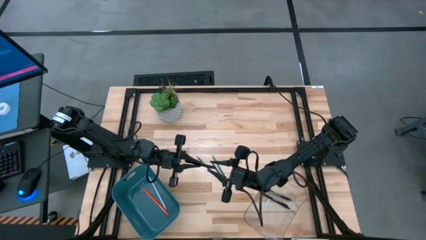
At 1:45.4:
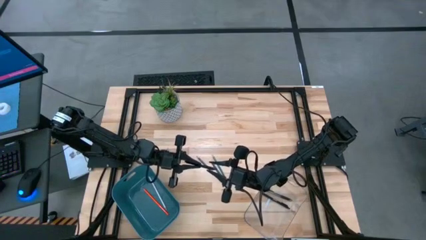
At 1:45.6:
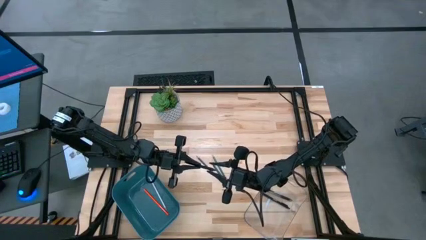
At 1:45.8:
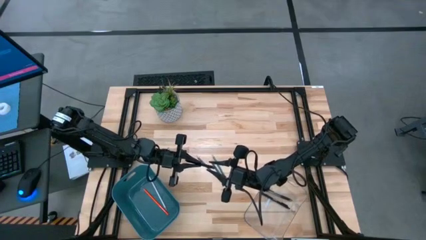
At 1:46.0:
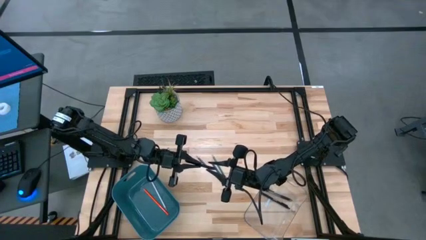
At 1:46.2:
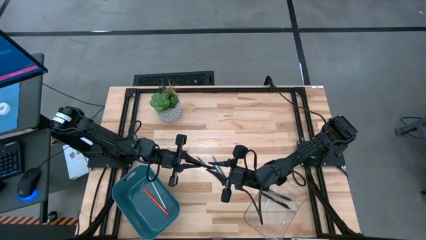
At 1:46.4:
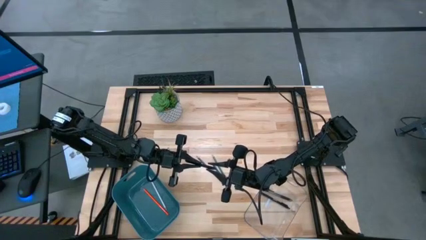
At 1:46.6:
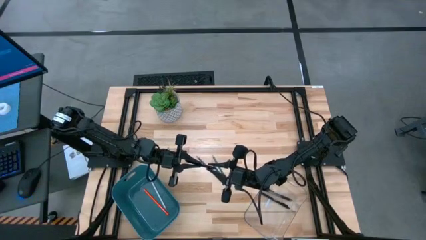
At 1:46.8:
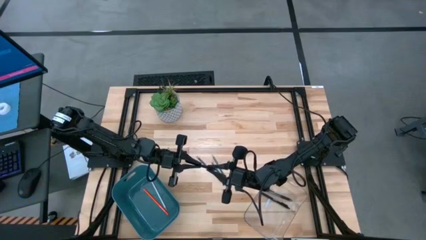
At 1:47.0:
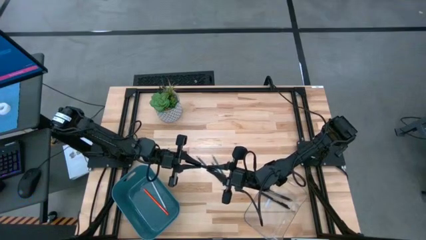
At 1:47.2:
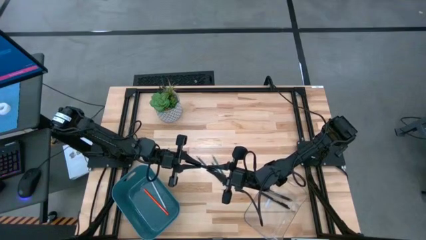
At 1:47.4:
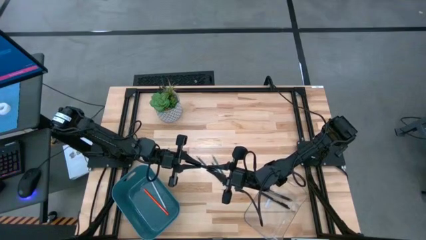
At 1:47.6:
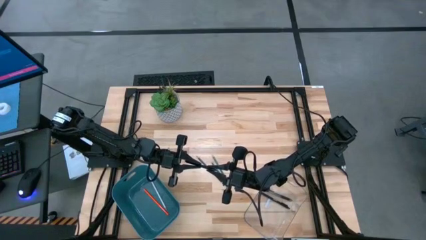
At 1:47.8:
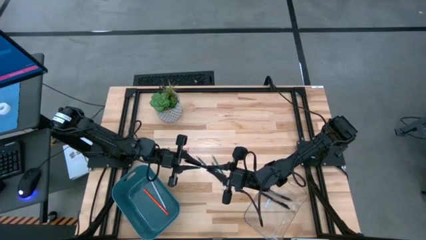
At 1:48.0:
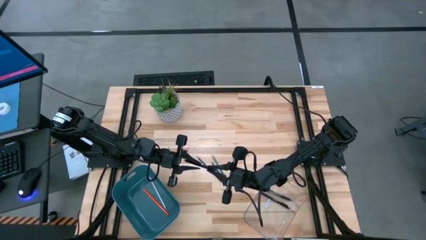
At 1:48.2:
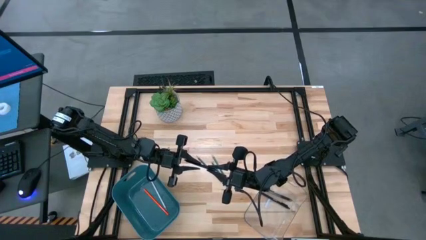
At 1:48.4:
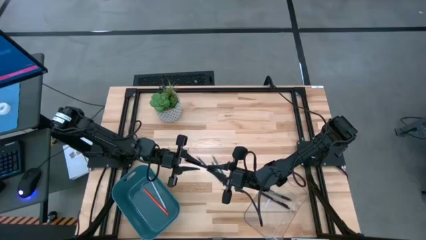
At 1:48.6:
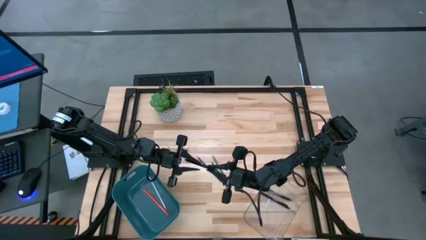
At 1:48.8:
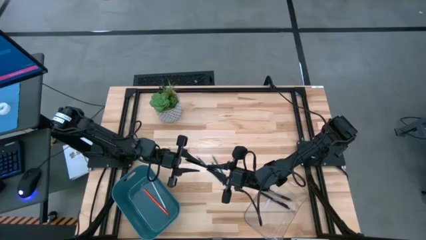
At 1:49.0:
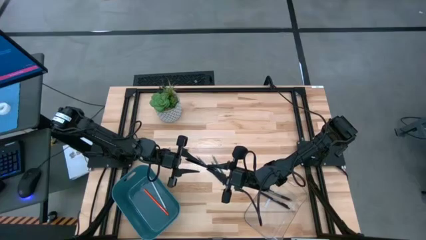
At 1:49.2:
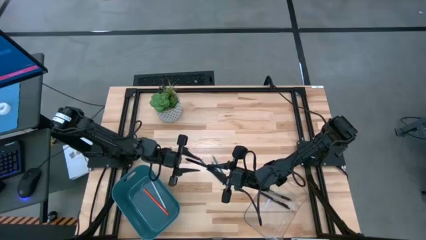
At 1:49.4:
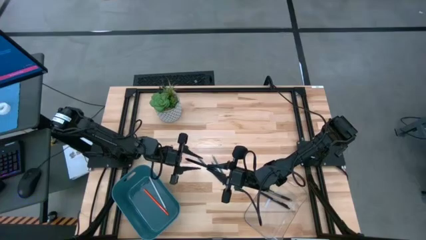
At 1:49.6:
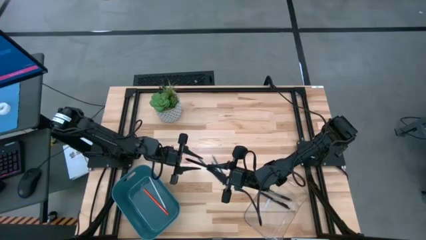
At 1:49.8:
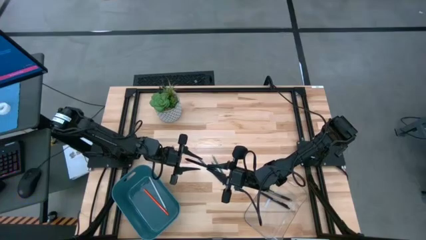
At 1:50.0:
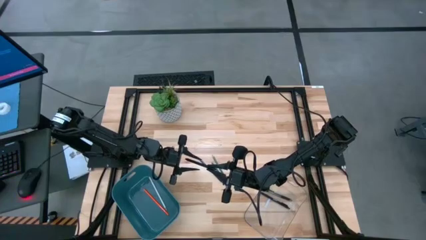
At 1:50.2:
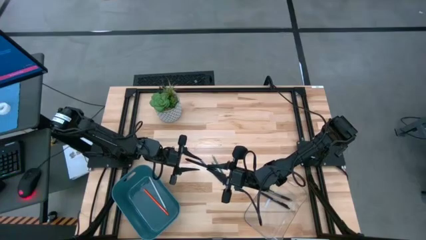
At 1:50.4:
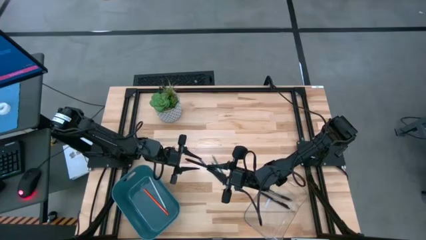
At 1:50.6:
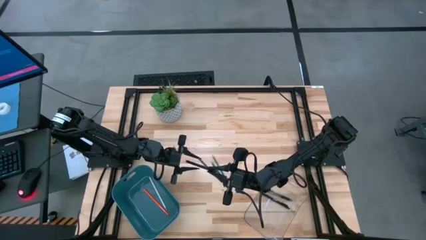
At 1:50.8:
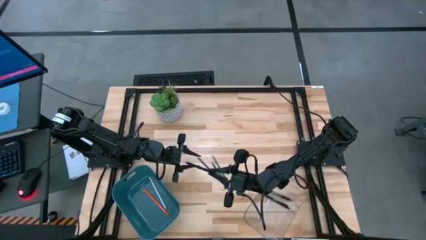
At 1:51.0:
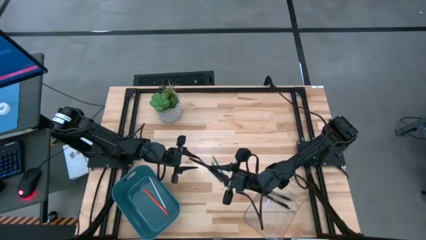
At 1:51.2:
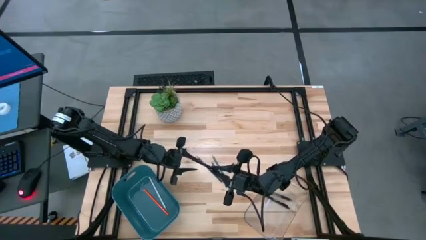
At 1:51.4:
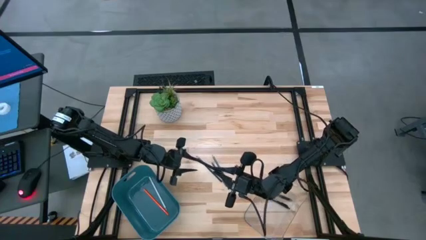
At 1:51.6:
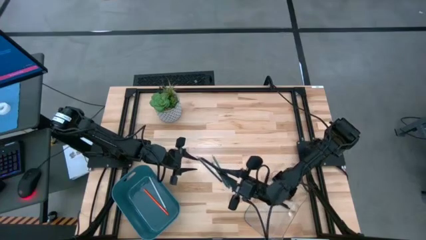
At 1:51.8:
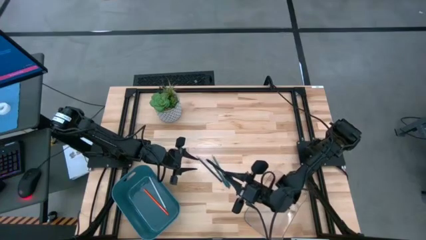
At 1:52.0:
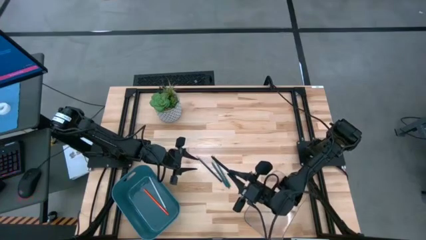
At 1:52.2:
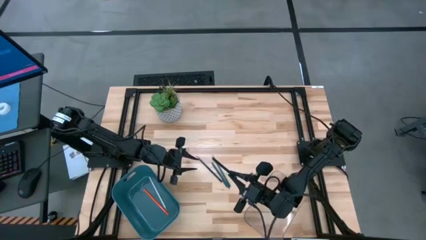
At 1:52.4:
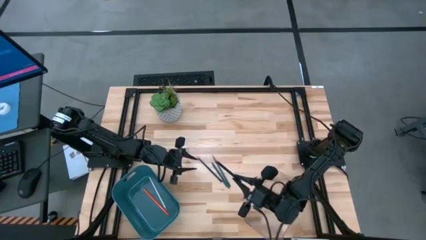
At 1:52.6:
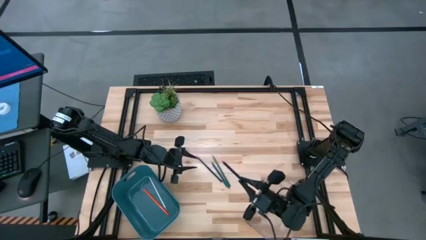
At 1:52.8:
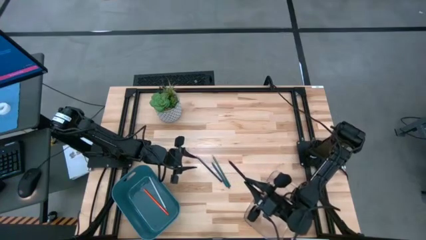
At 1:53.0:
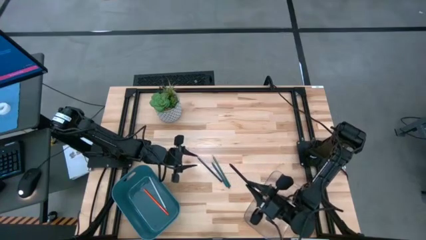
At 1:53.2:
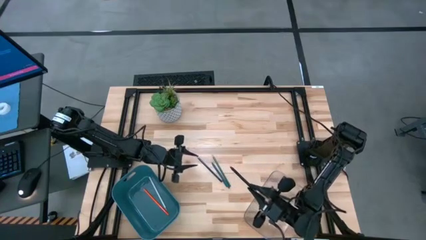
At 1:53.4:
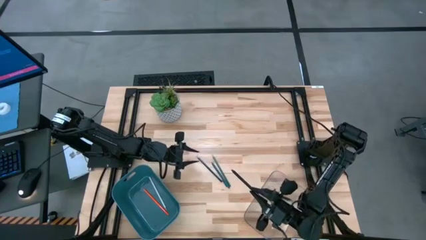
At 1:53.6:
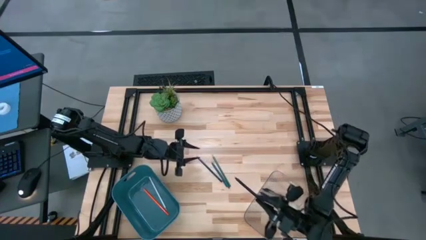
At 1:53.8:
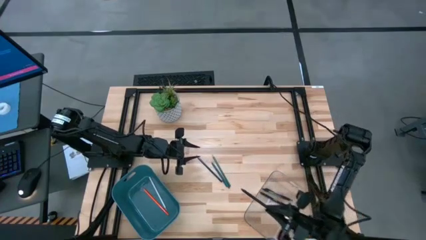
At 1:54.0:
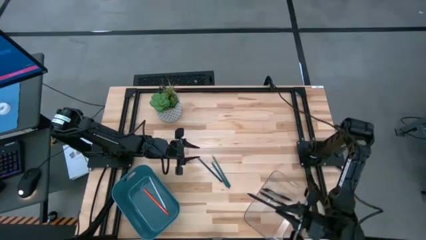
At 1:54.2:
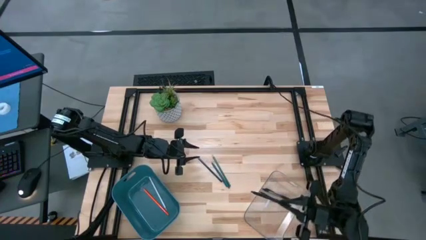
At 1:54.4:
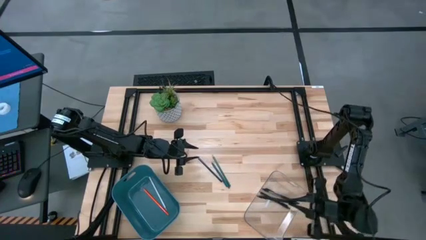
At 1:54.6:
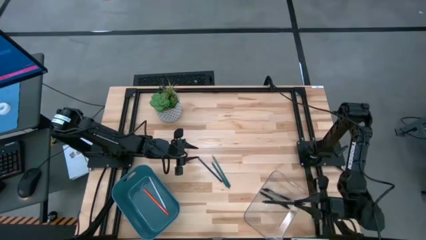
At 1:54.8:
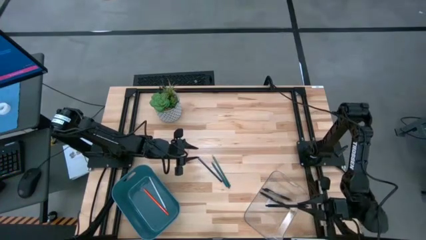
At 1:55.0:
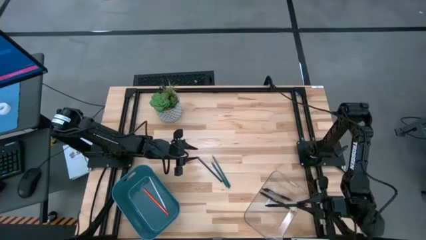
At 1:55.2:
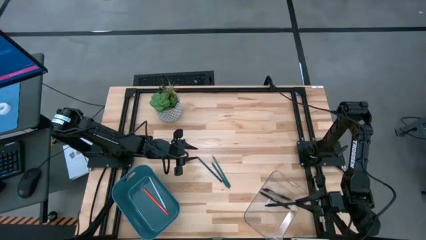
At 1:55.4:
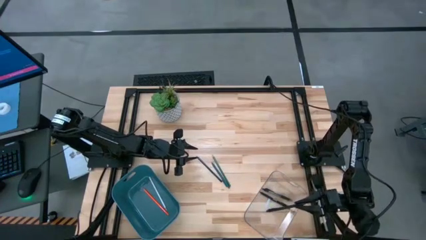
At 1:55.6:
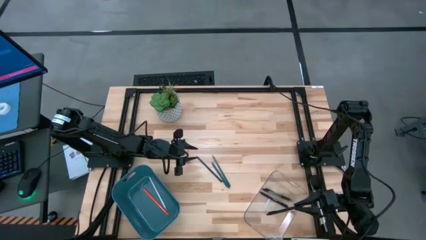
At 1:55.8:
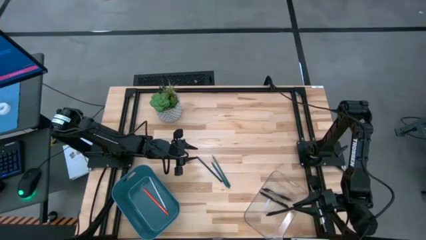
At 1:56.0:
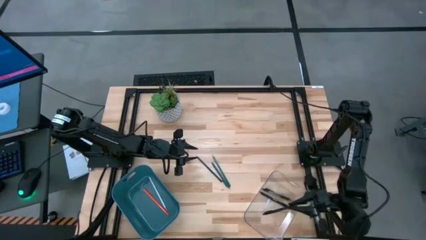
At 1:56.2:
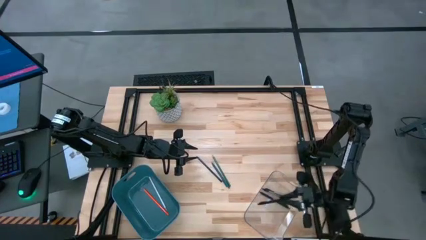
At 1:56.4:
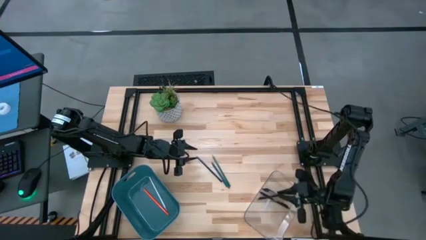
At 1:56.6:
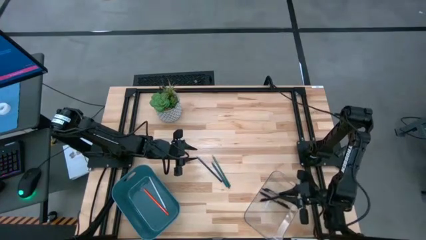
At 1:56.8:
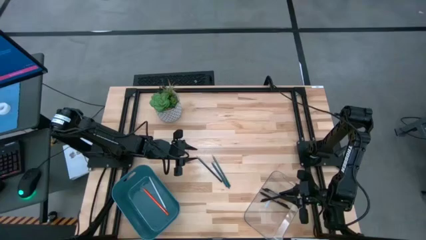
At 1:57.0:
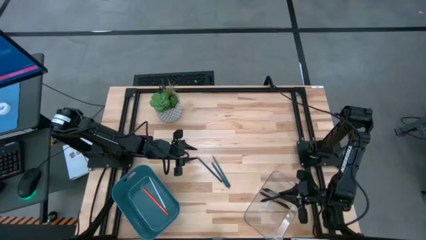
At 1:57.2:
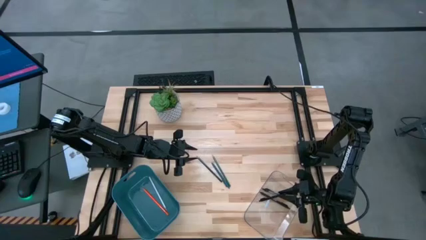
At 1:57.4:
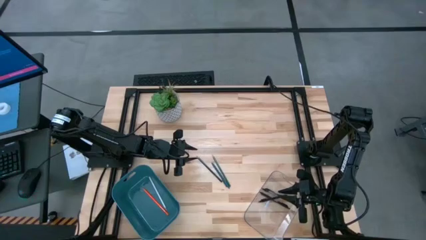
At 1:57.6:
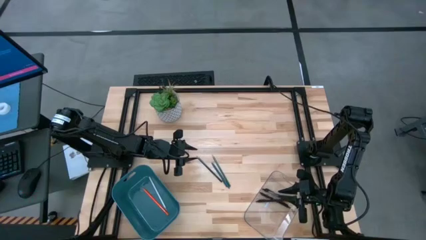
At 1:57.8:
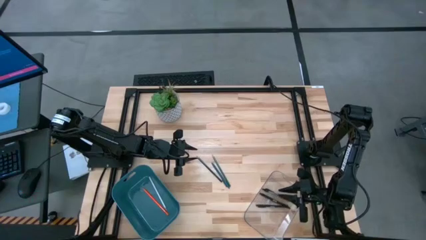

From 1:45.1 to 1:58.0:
Task: Sort pens & pencils
Put the black pen into the transparent bin
